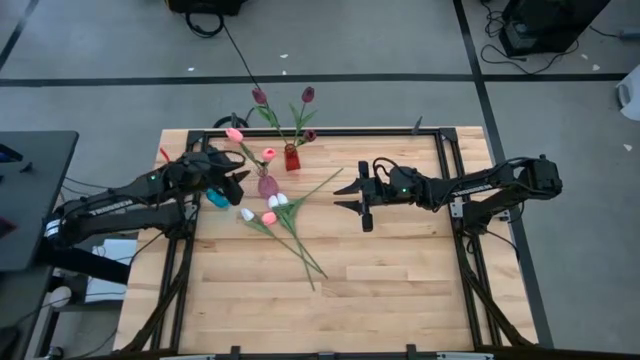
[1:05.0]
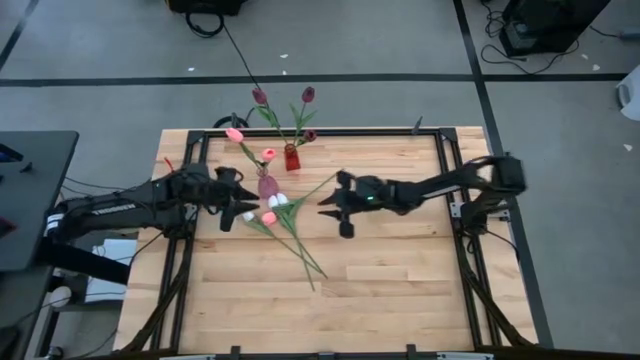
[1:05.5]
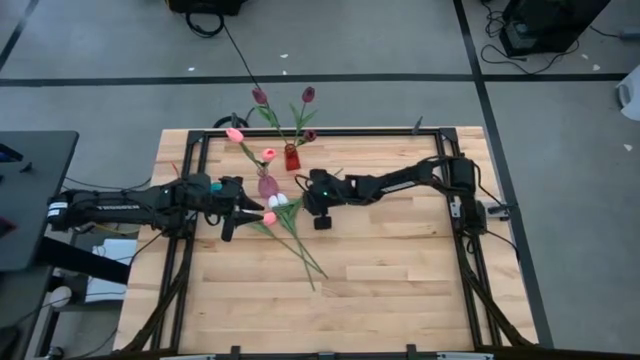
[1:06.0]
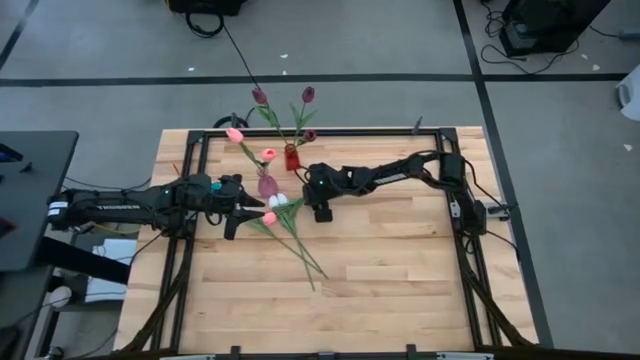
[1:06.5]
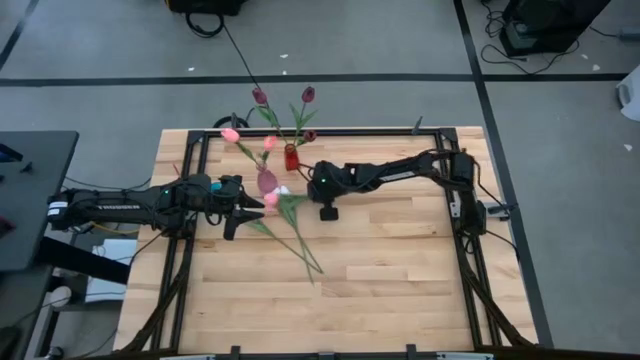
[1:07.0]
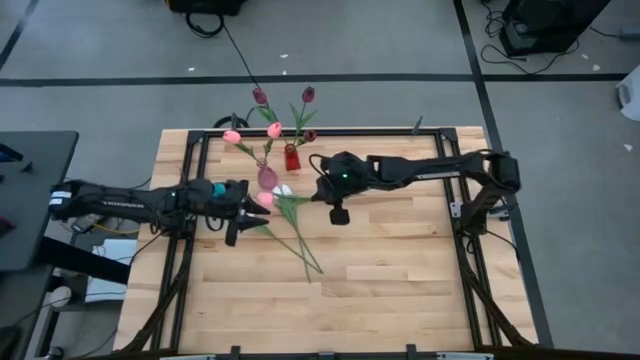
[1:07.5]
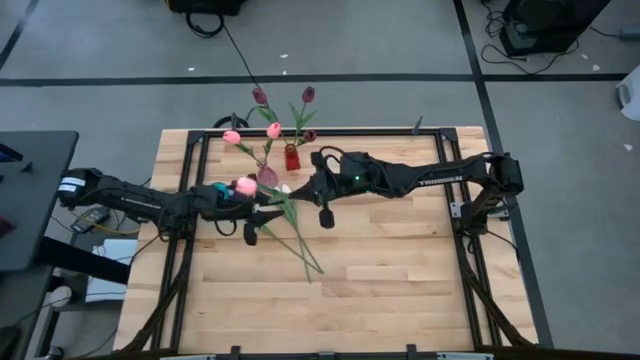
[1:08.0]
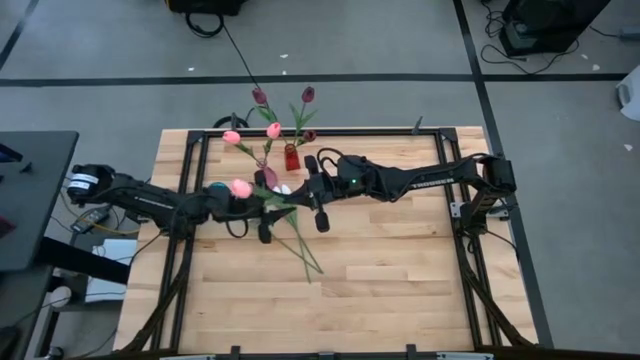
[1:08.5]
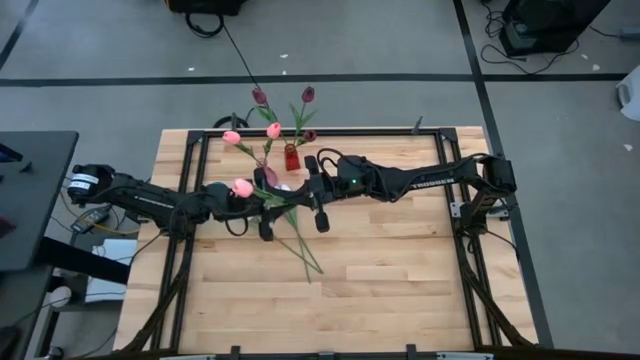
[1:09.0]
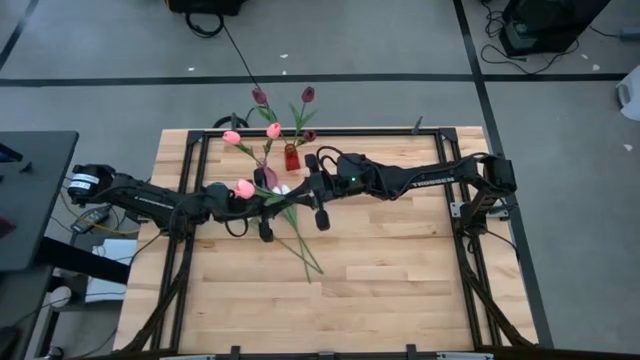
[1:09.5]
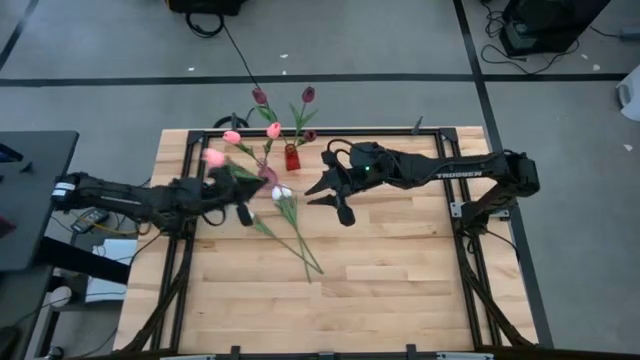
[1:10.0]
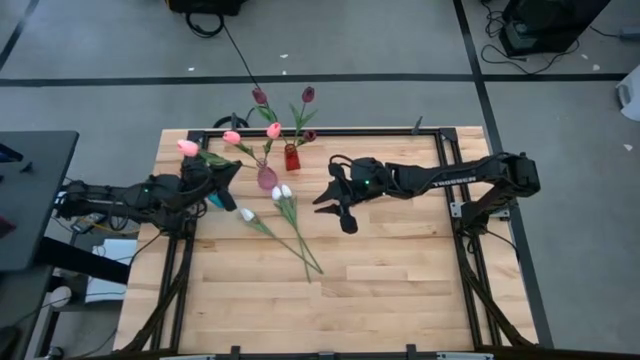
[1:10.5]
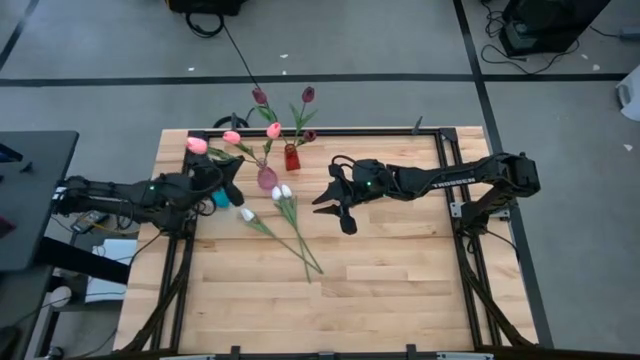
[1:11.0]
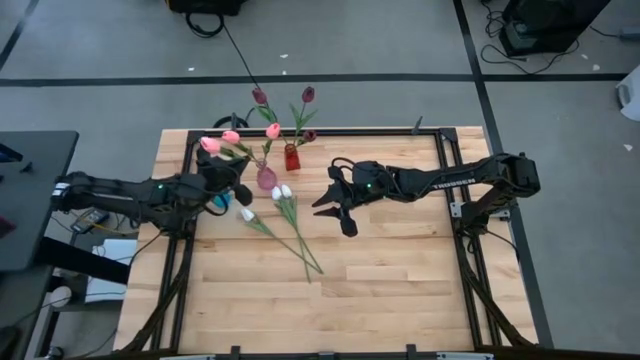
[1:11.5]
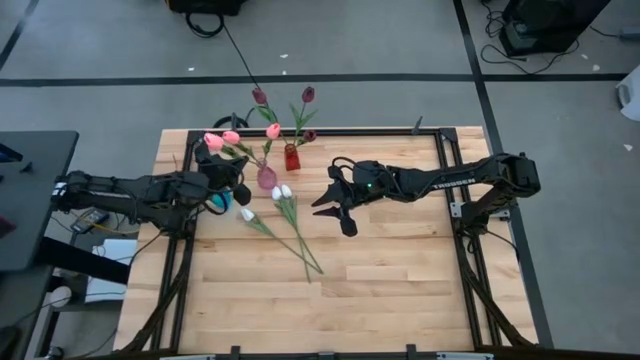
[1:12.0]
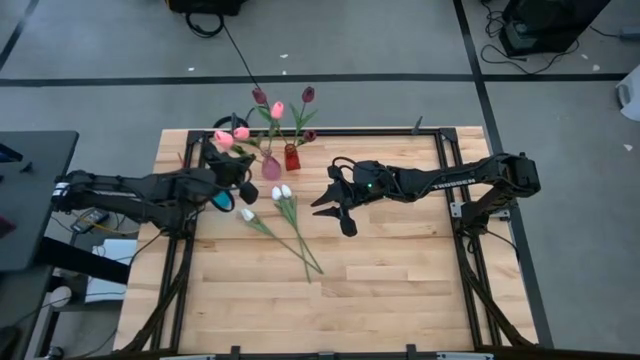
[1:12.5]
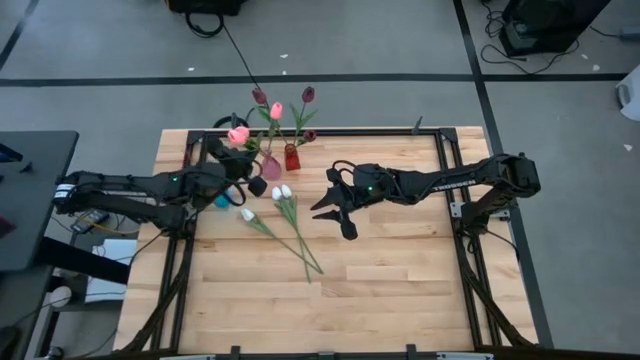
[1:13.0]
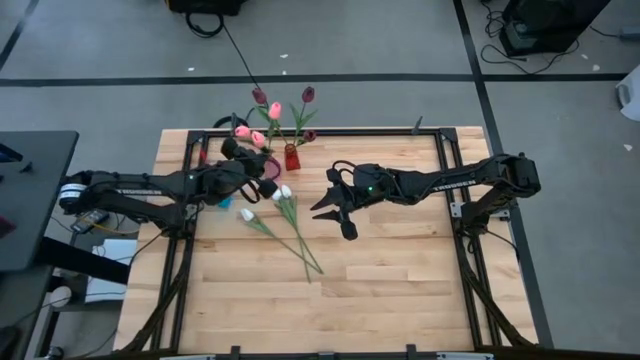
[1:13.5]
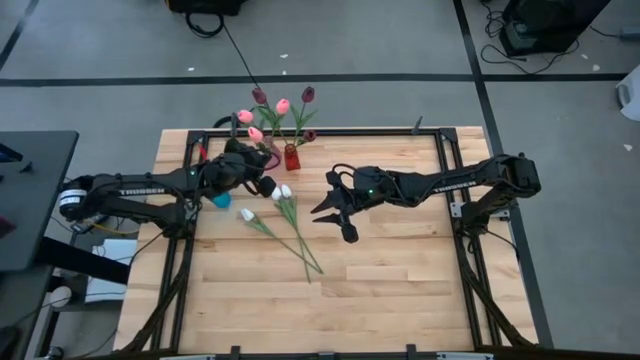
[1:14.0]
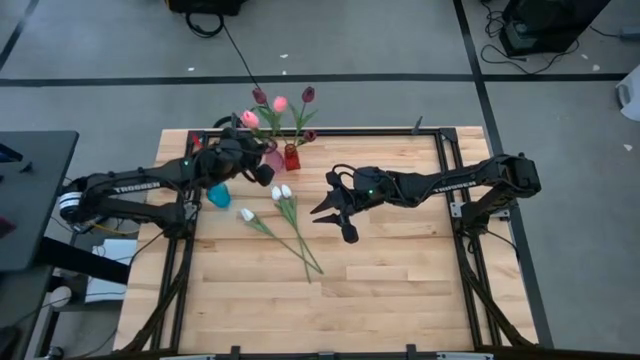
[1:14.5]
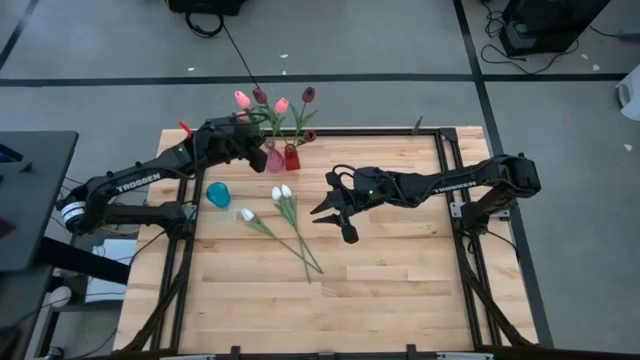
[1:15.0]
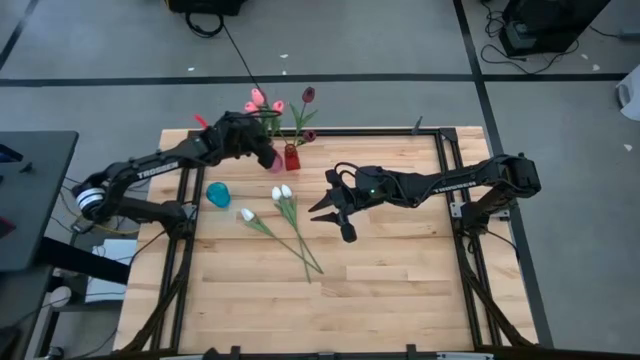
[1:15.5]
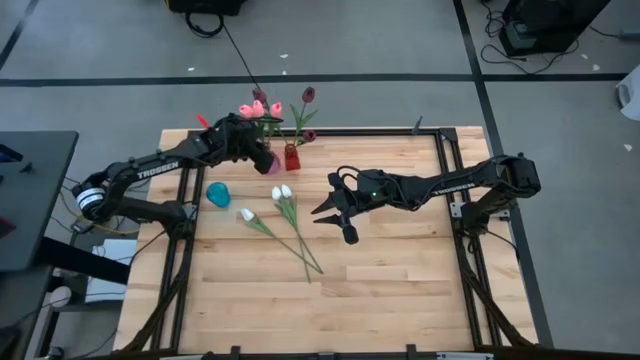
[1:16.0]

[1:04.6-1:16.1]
Task: Sort flowers into vase by color
Put the pink flower into the purple vase

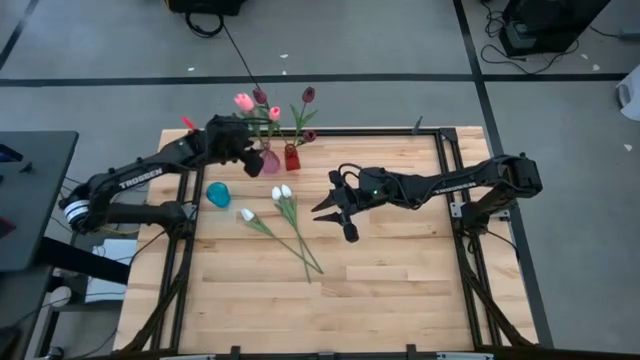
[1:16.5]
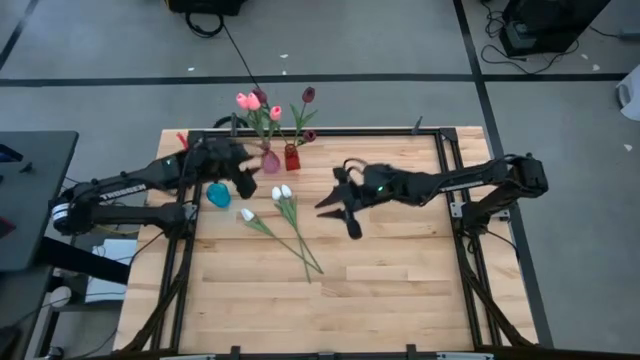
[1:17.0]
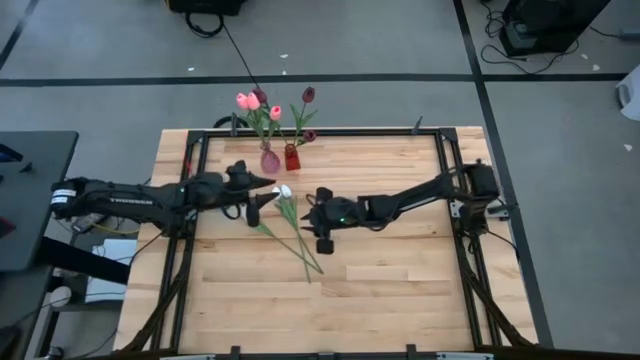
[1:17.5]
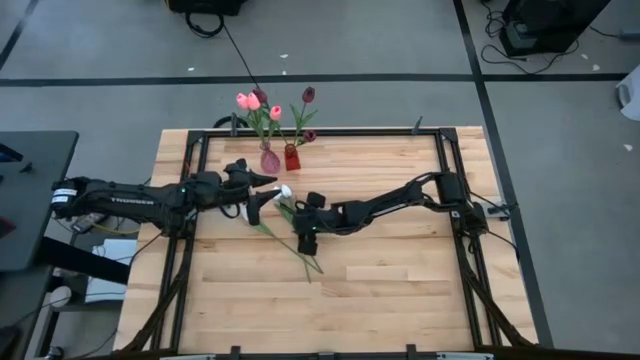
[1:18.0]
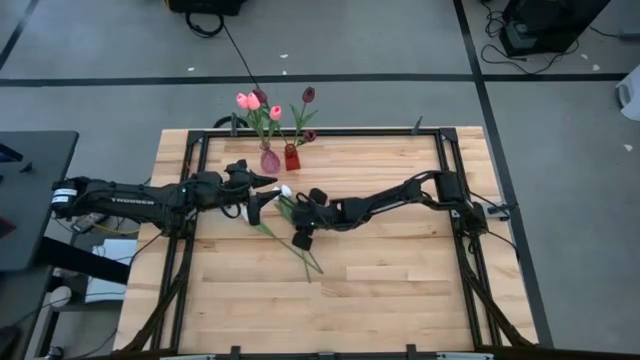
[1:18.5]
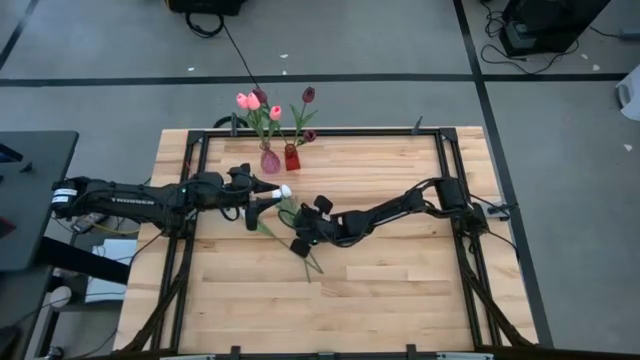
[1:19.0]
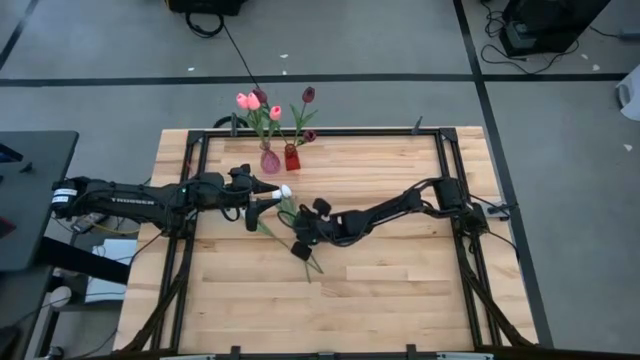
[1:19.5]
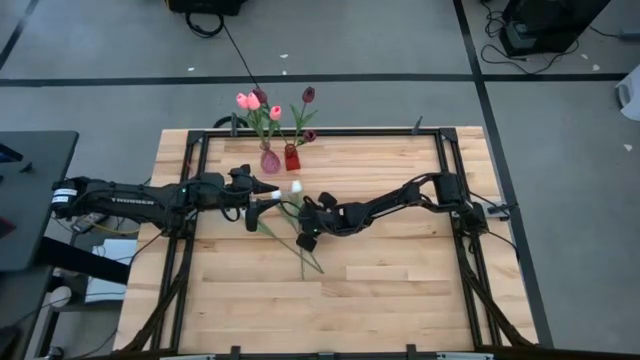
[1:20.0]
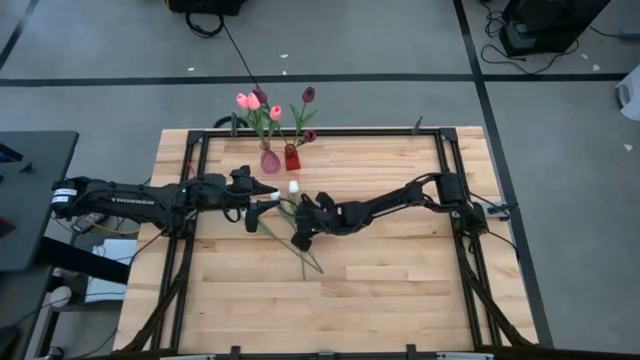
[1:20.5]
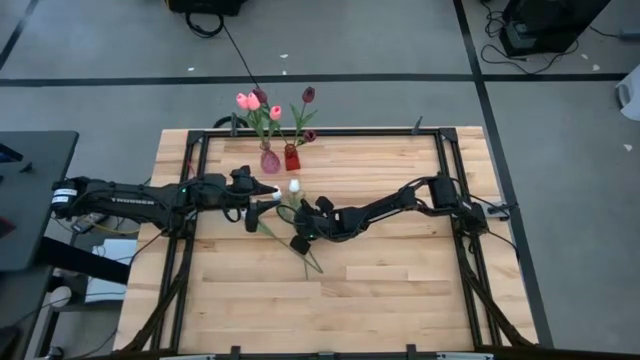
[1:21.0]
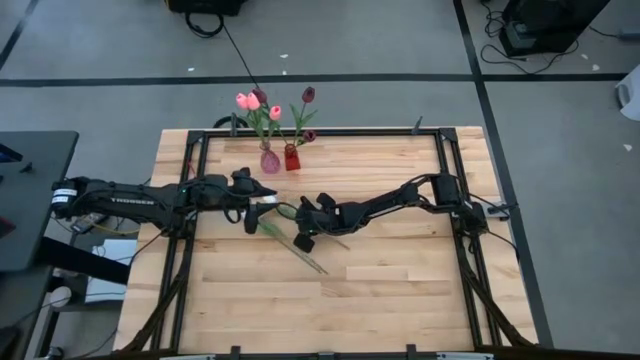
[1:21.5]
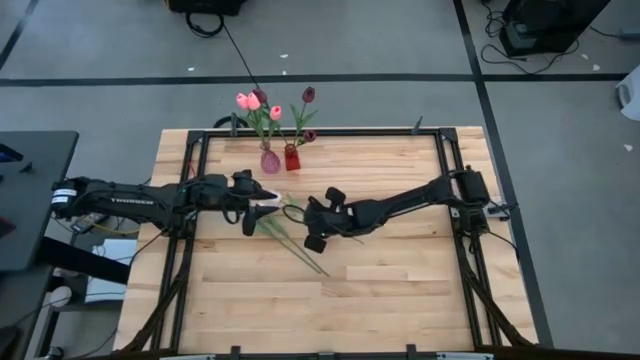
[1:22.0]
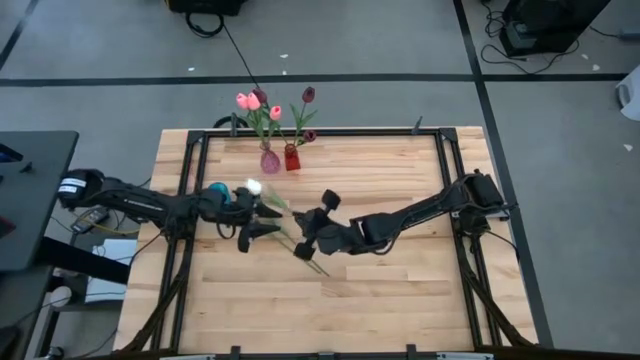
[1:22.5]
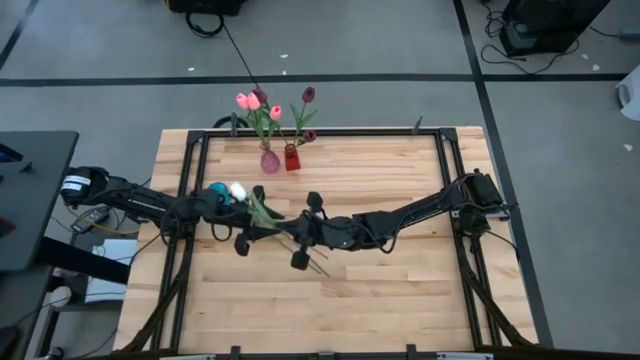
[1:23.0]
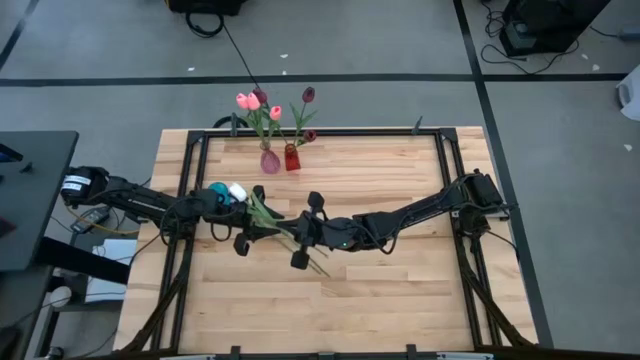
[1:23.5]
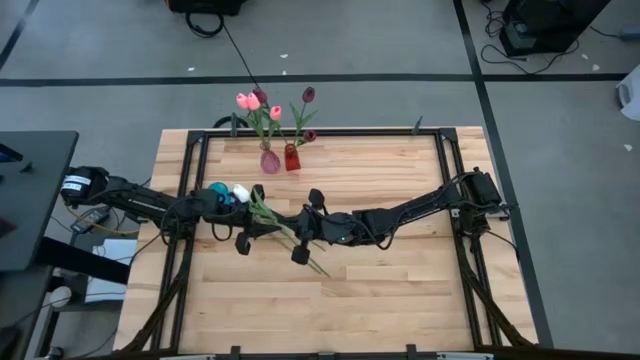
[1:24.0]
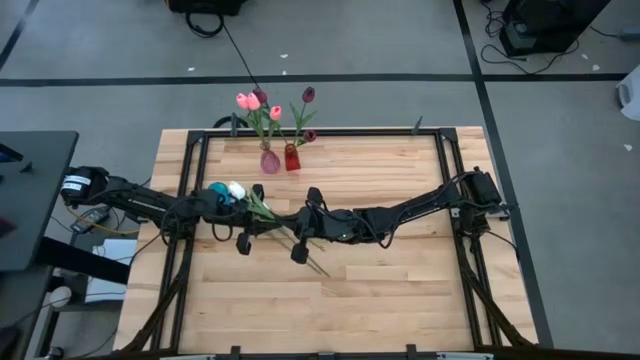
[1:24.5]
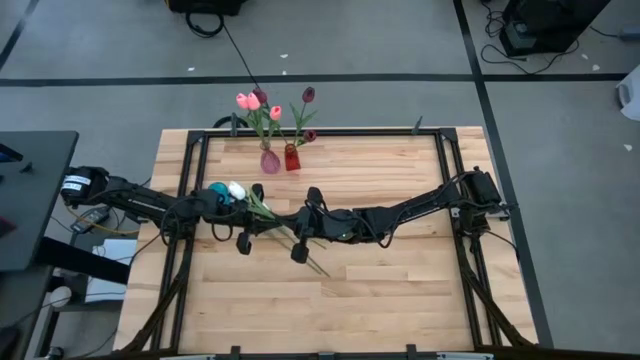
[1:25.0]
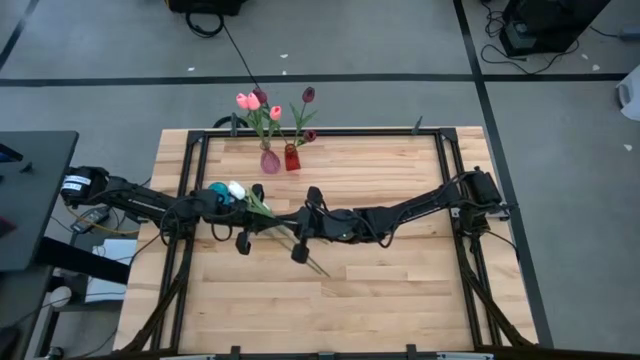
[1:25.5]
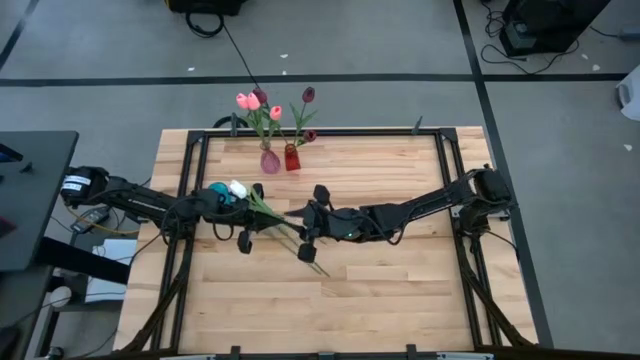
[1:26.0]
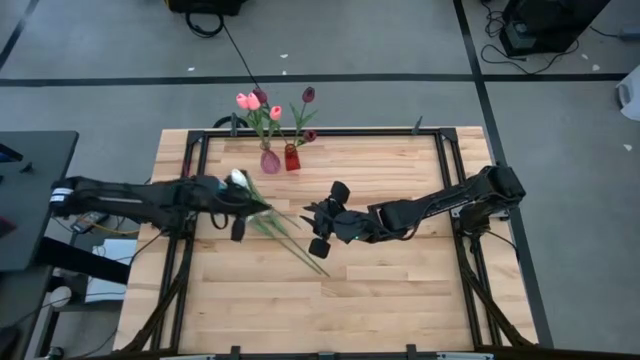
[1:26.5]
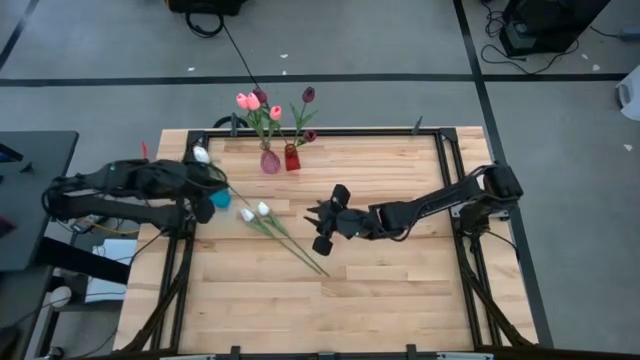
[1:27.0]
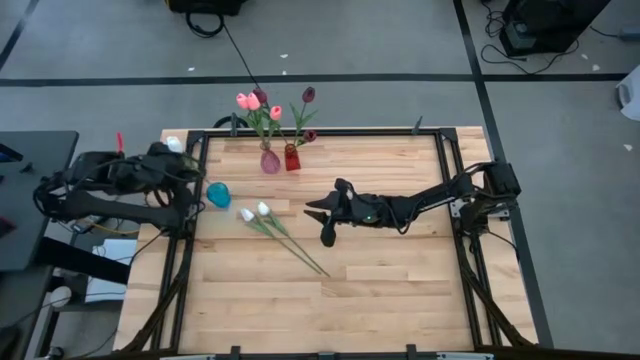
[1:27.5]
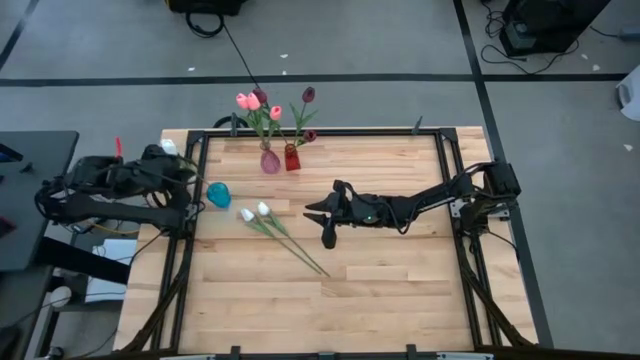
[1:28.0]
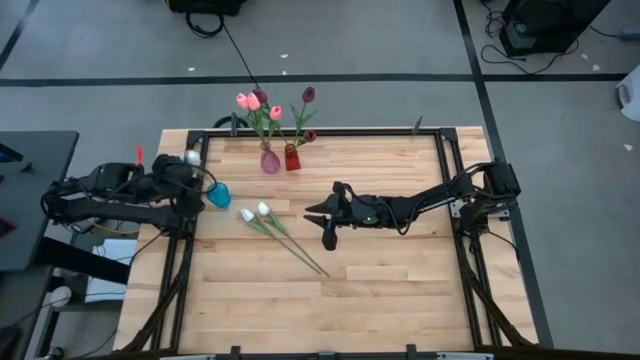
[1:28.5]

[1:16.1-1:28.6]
Put the white flower into the blue vase
